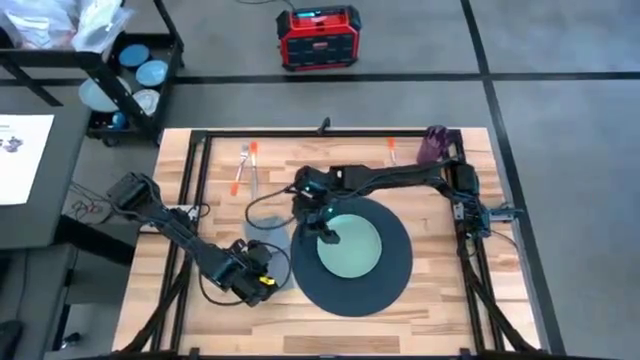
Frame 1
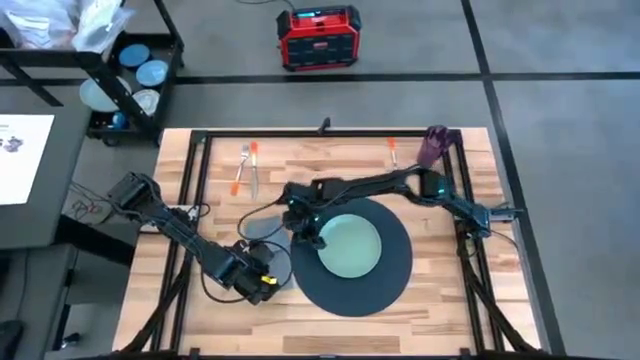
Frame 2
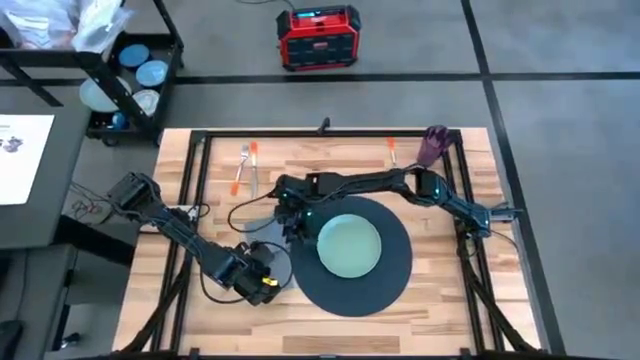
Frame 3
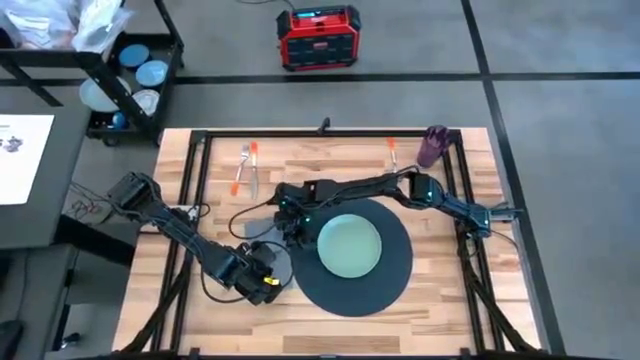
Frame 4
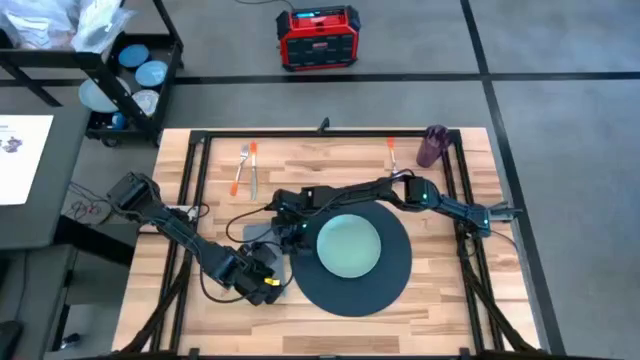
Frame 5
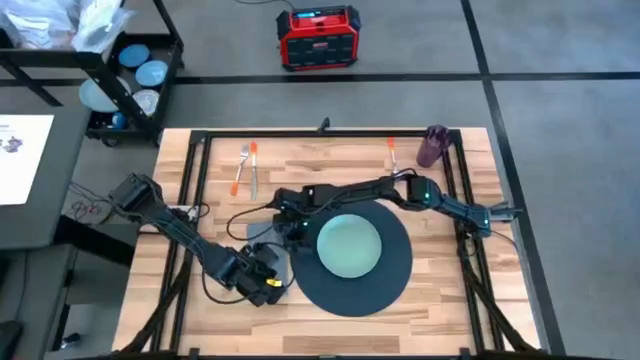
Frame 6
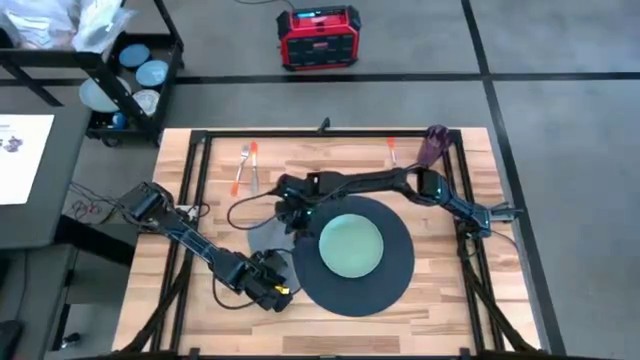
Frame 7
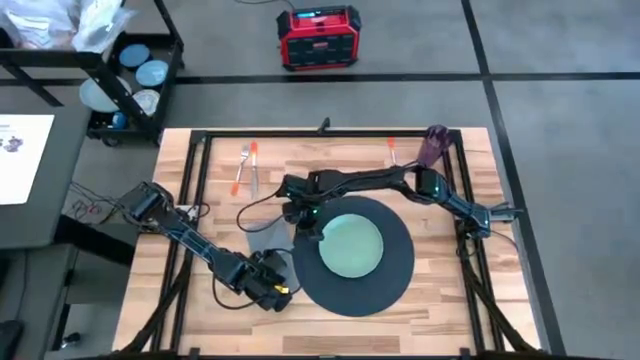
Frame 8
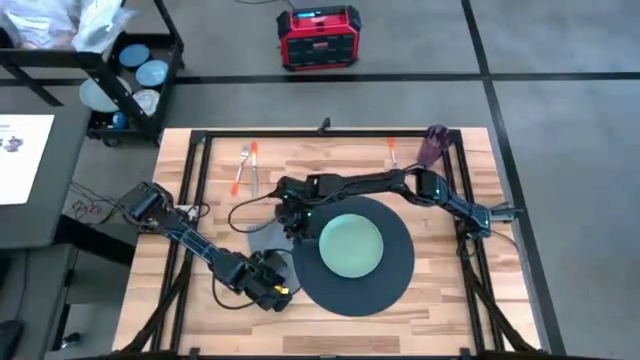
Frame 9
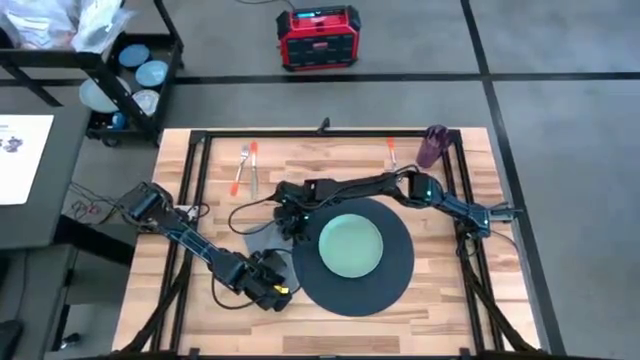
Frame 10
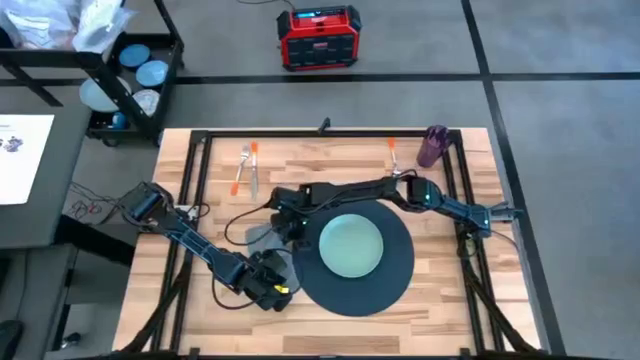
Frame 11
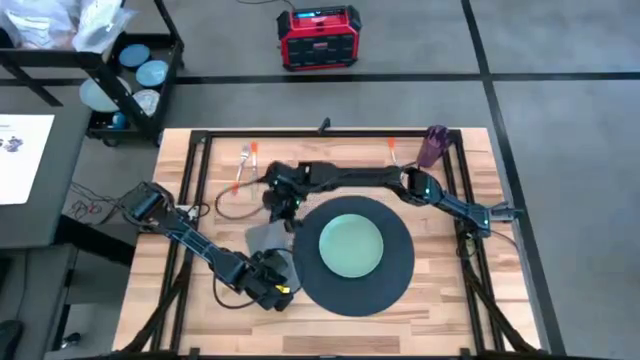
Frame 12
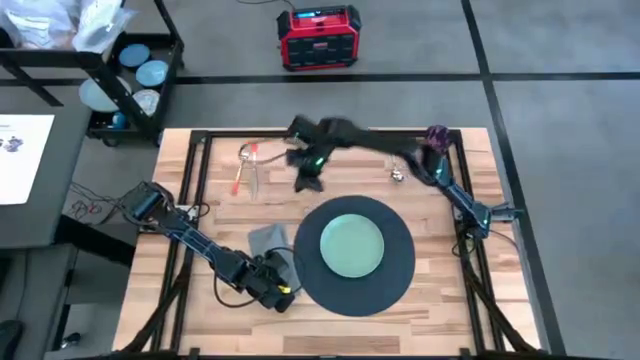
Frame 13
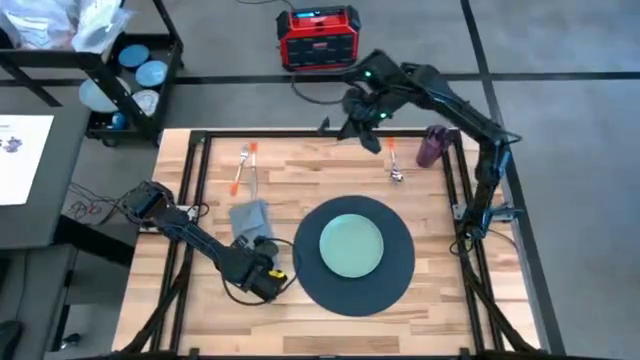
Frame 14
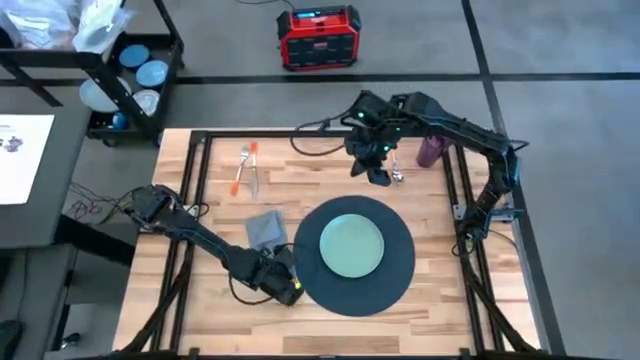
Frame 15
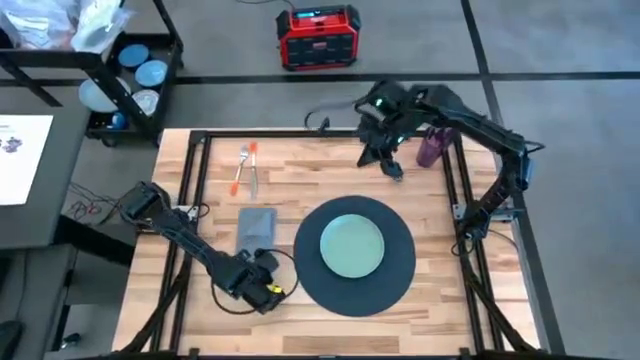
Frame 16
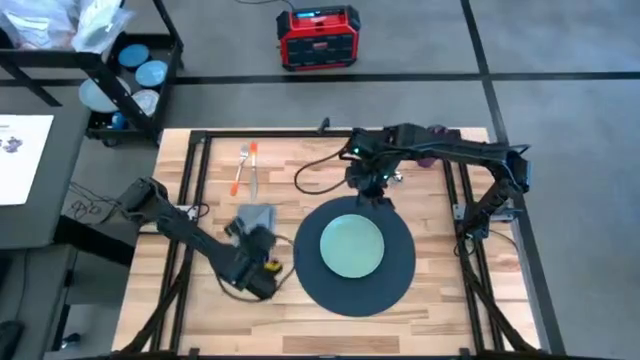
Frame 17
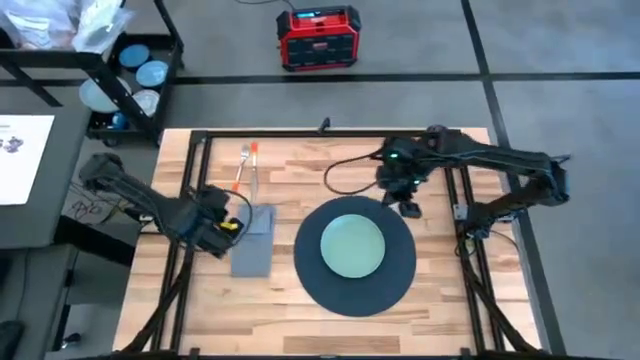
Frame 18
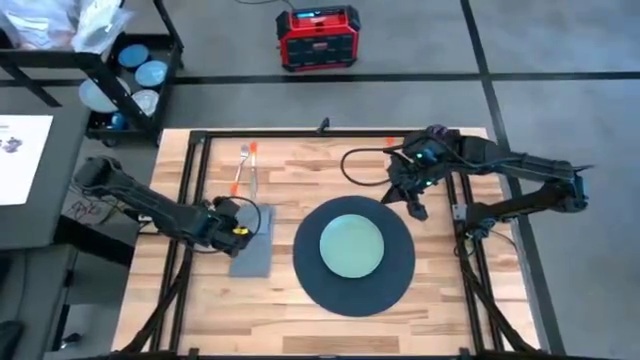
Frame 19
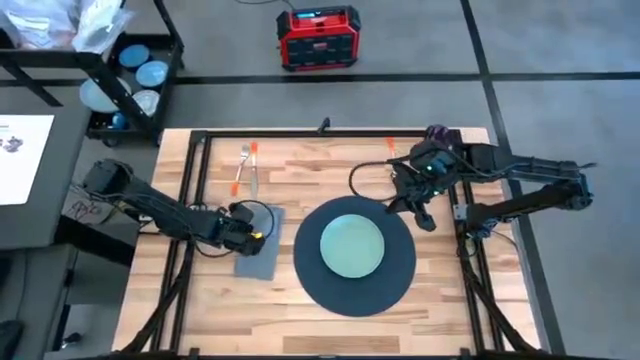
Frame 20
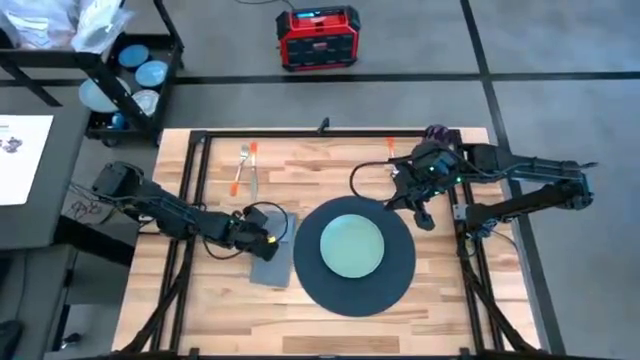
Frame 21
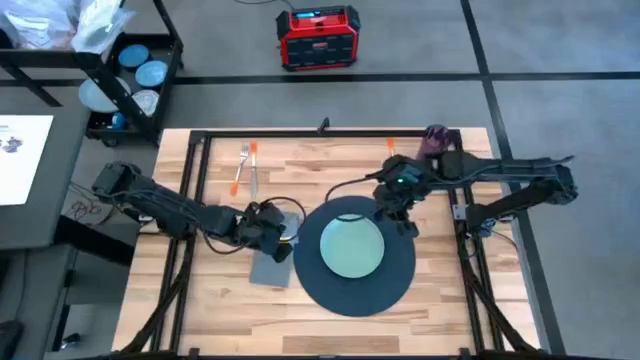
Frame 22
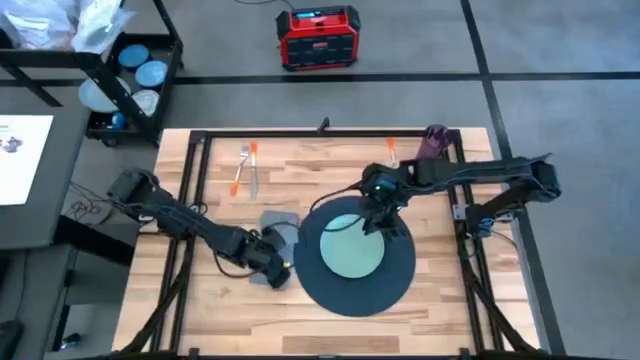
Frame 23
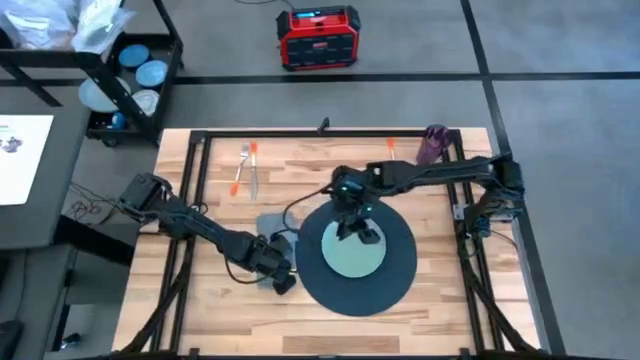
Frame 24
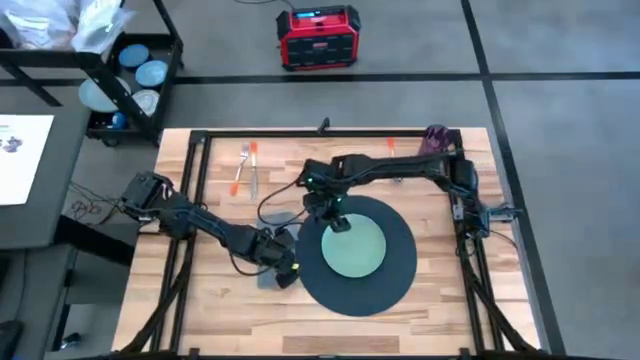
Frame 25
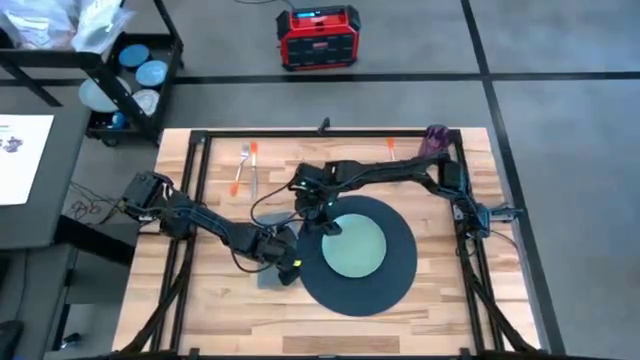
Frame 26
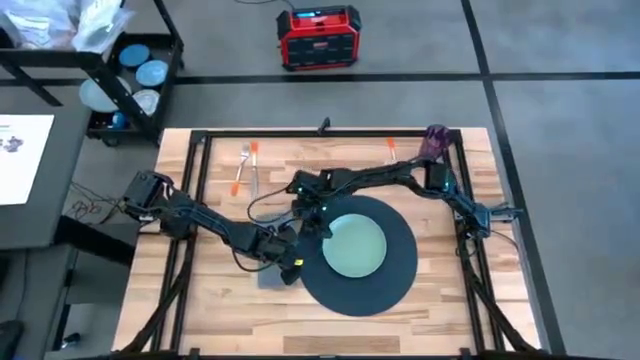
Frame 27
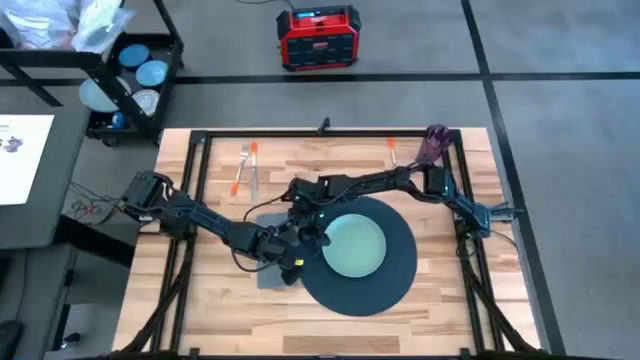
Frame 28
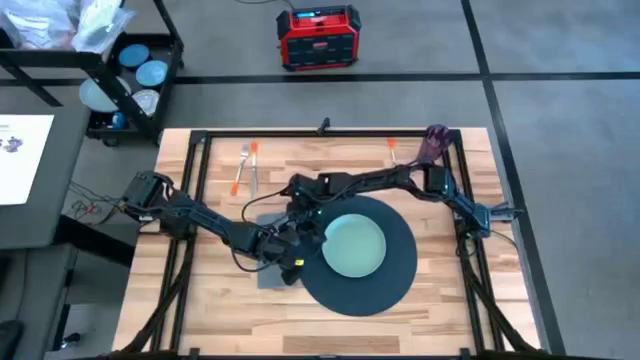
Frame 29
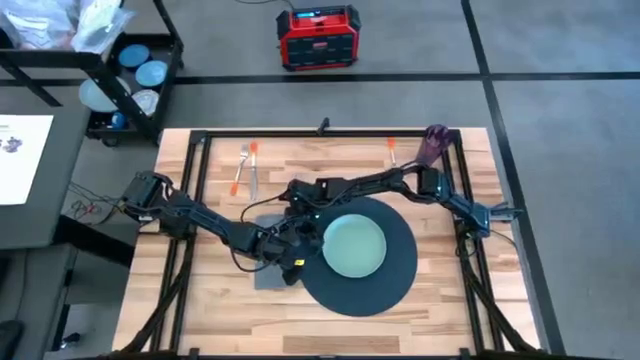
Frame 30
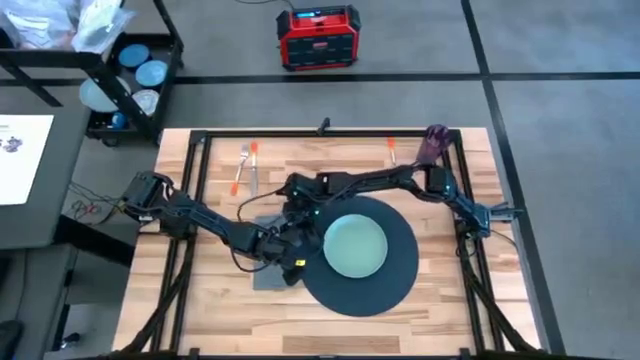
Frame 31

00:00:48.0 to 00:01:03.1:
Task: Set table place
Fold the grey napkin

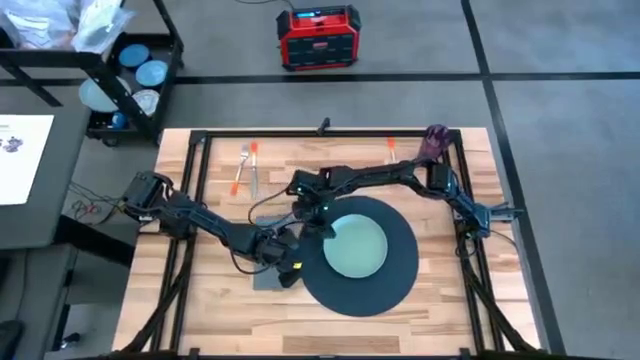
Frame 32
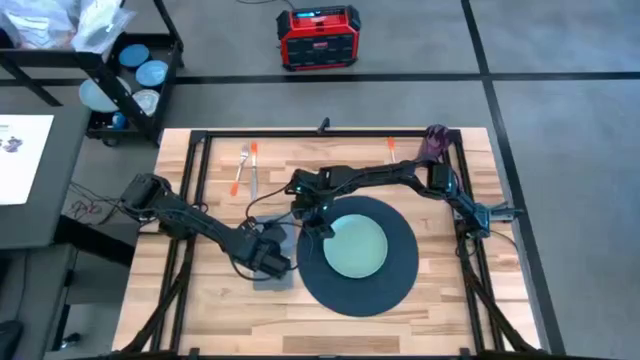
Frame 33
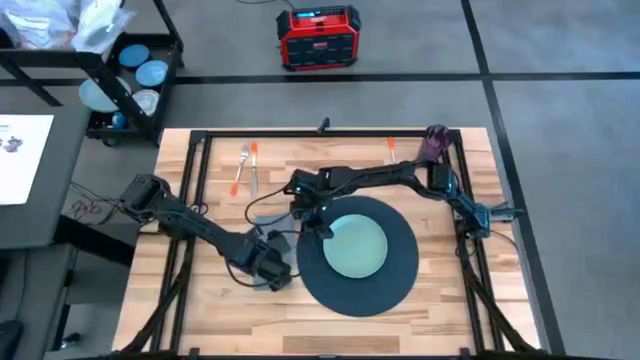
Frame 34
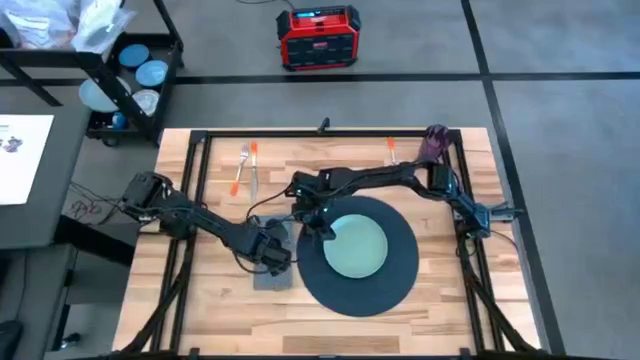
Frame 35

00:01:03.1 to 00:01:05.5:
Fold the grey napkin

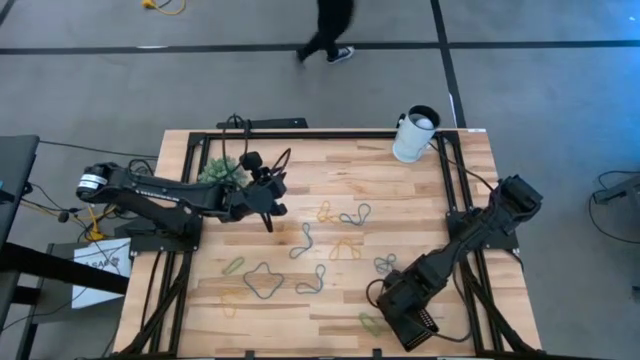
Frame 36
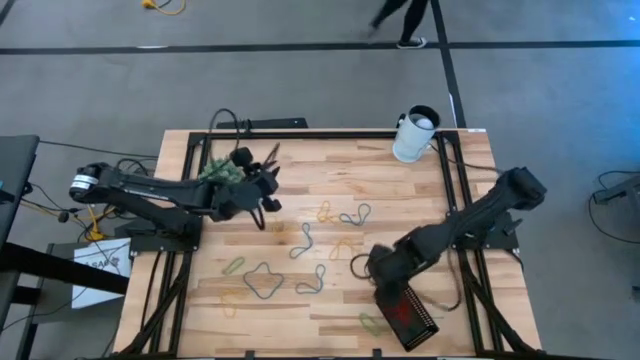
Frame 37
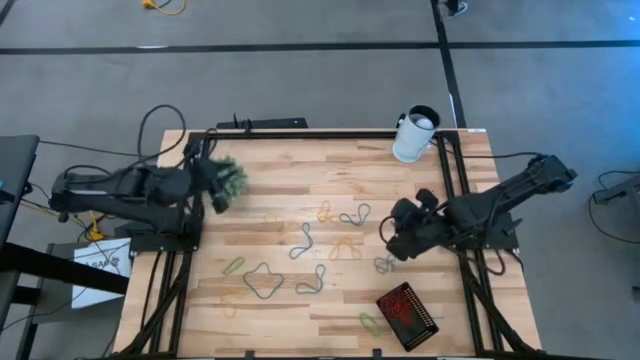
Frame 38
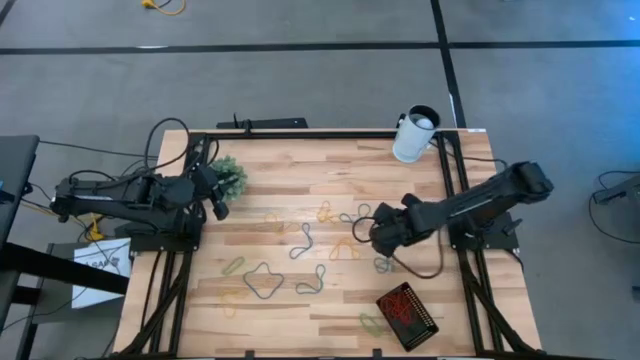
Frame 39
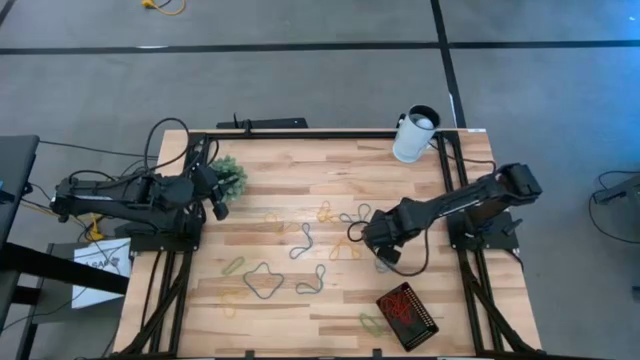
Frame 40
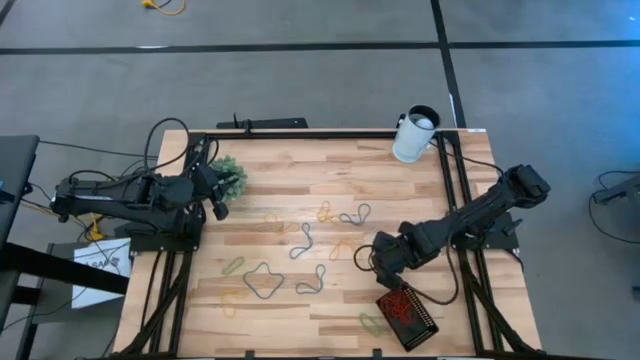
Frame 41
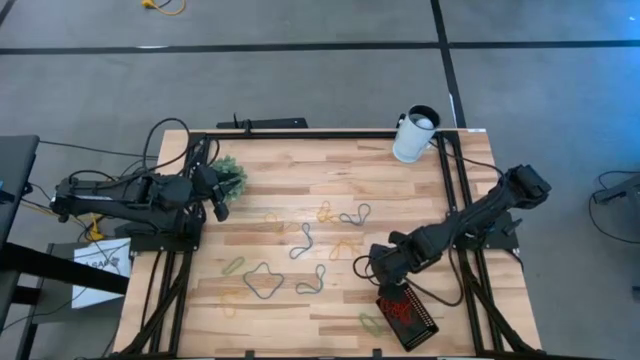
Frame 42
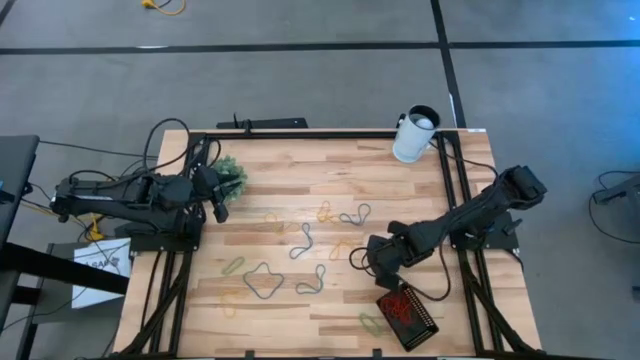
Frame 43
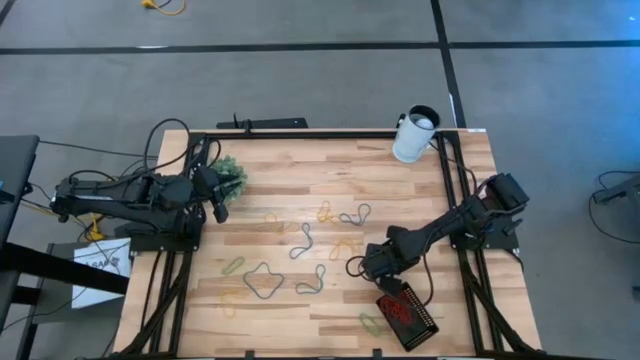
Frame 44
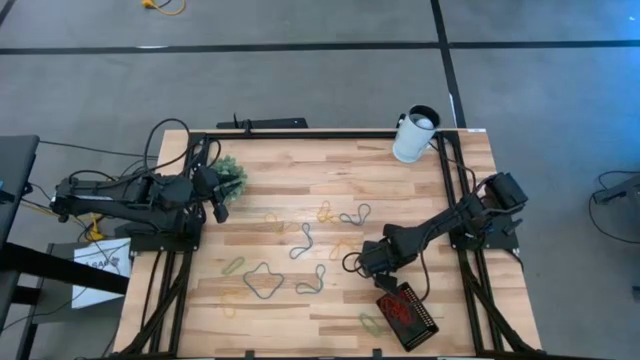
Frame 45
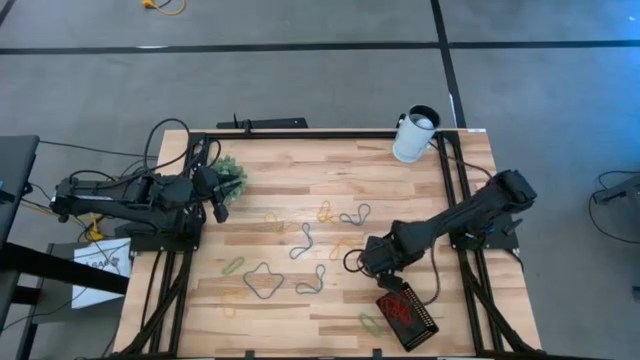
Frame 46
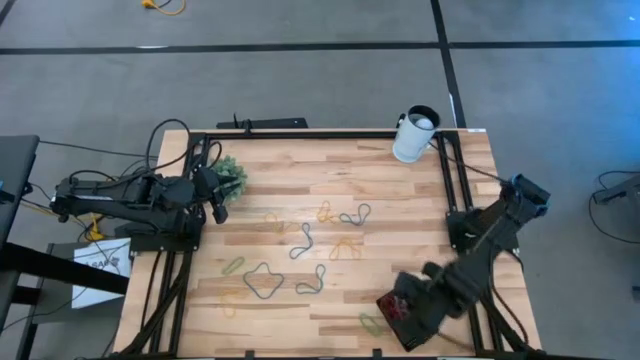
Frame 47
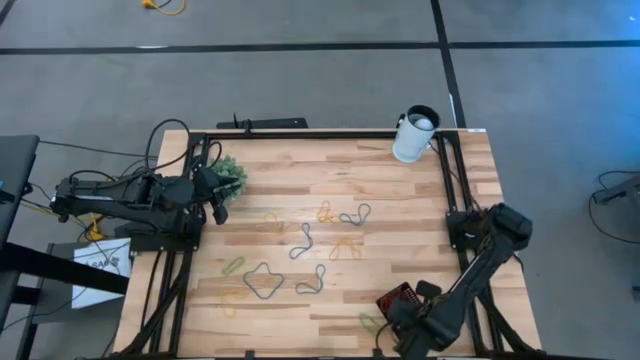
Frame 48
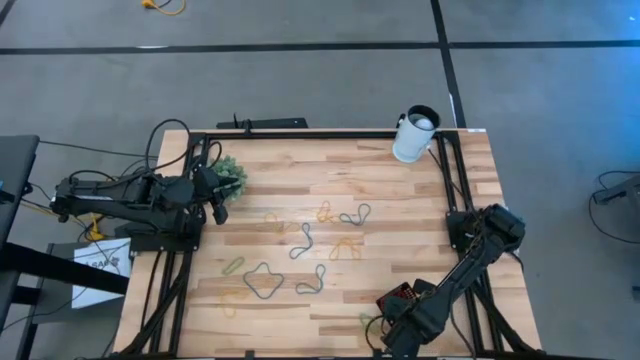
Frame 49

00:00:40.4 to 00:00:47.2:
Task: Pick and place rubber bands into bin
Put the blue rubber band into the black basket
